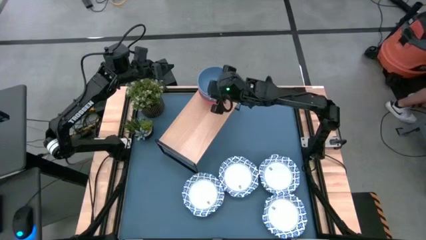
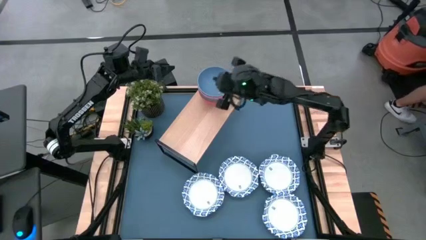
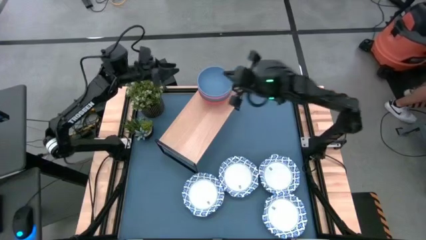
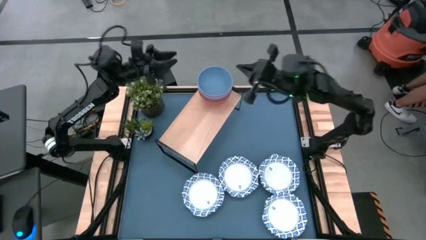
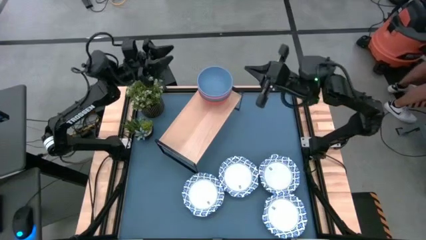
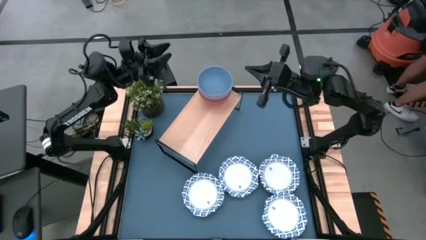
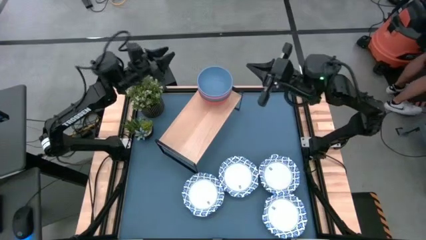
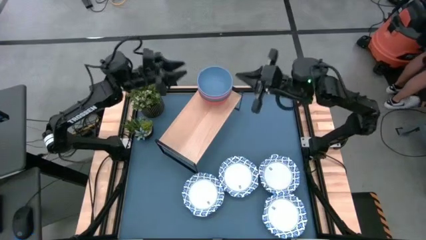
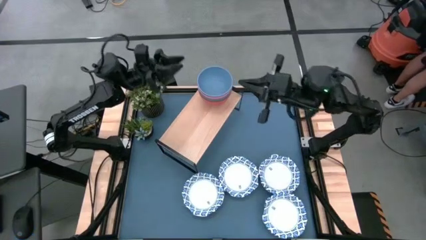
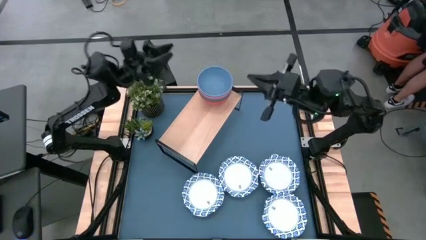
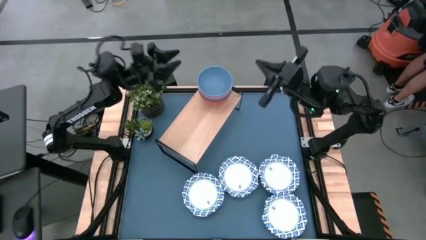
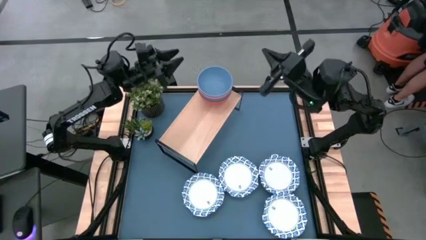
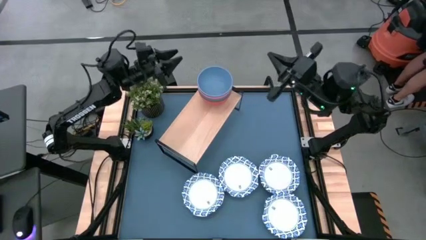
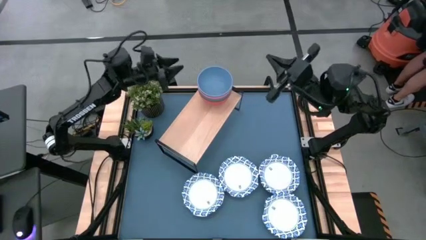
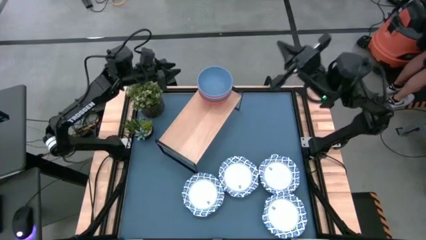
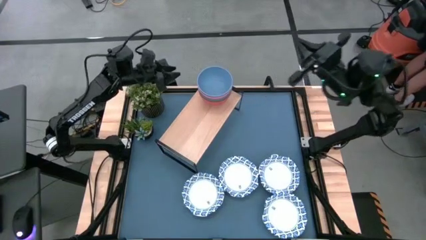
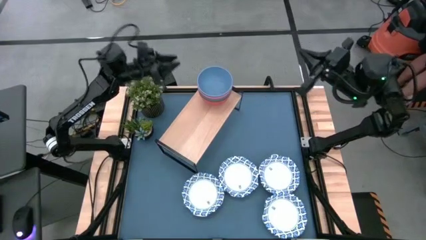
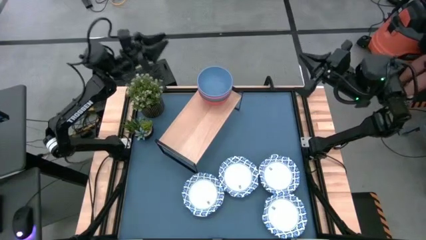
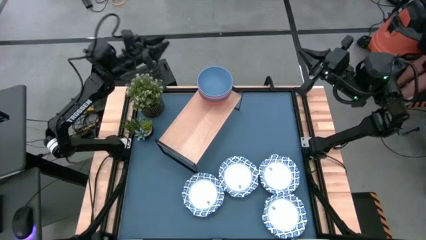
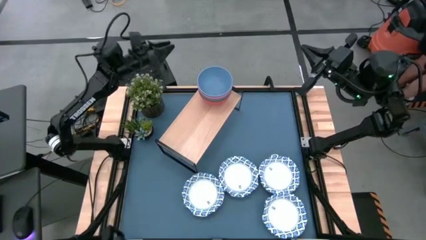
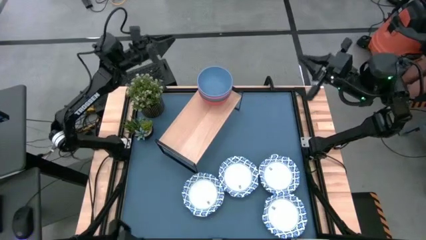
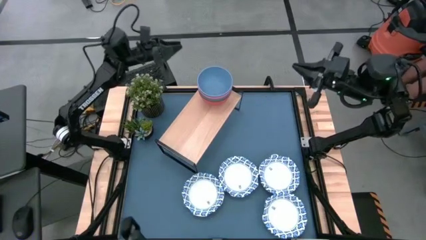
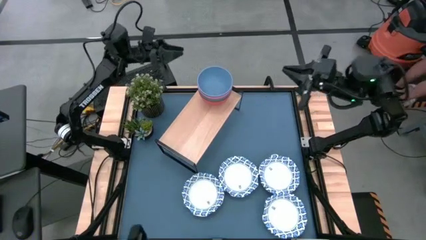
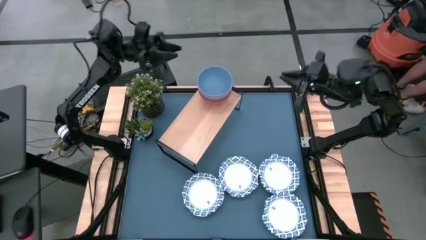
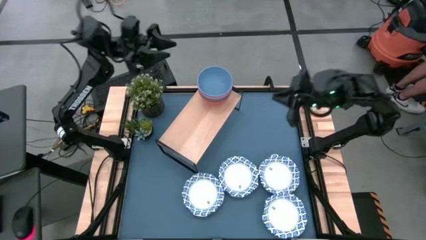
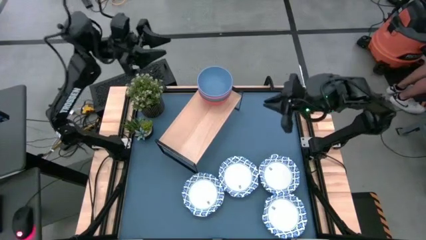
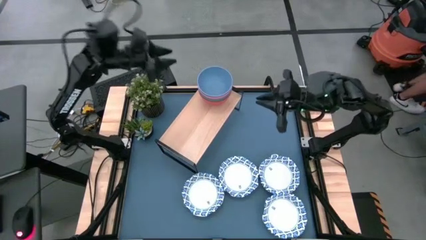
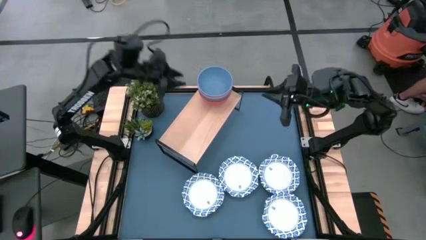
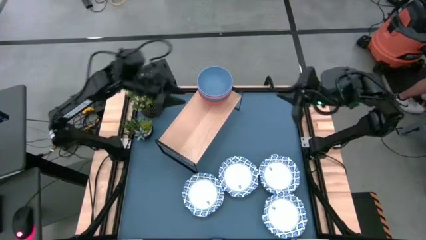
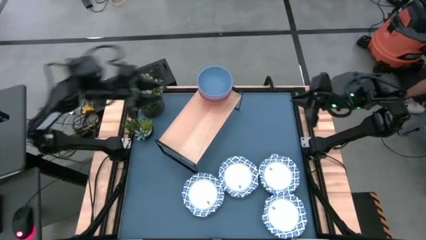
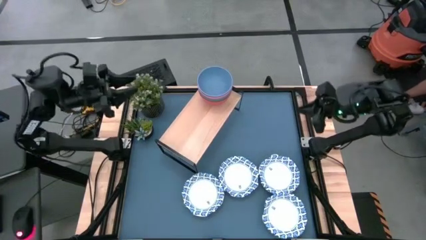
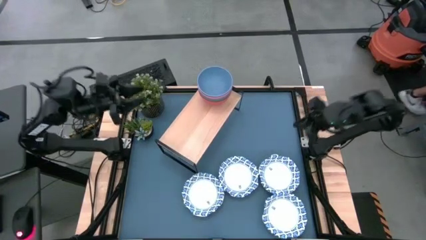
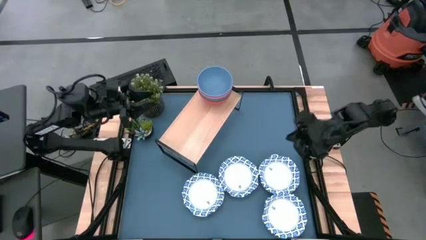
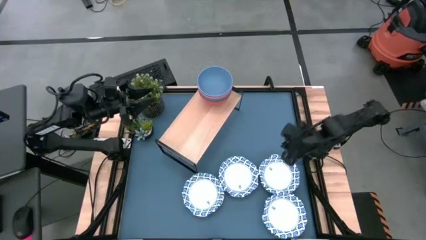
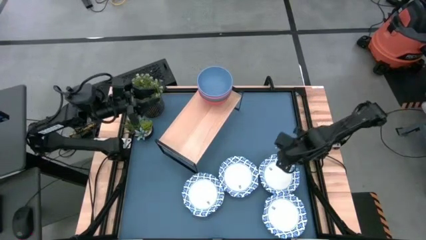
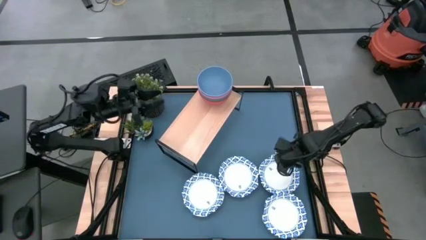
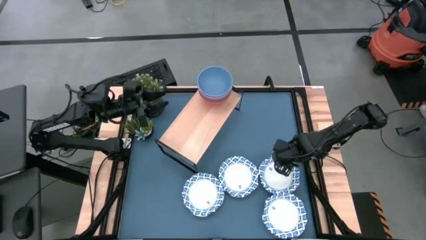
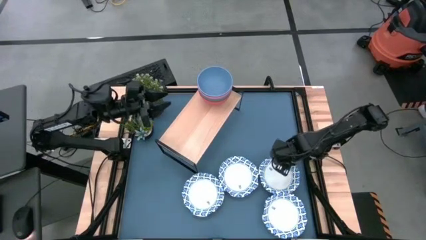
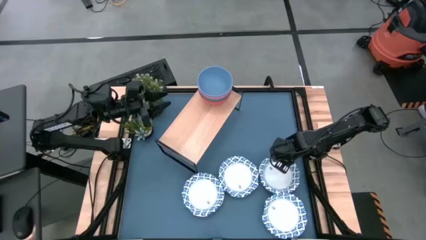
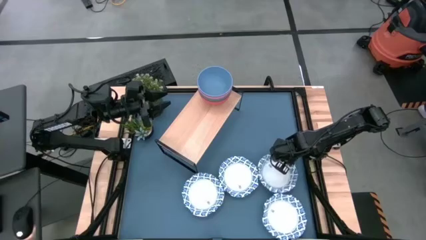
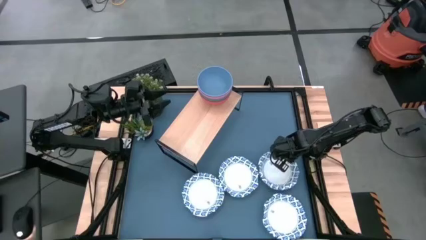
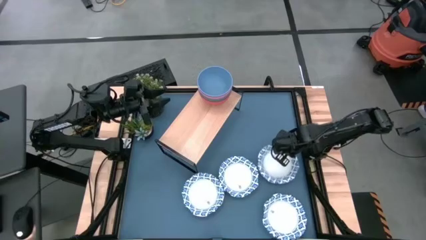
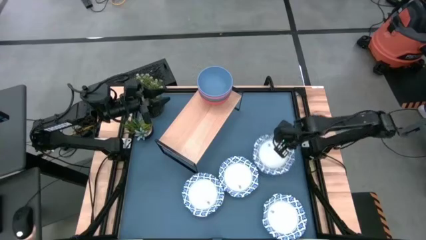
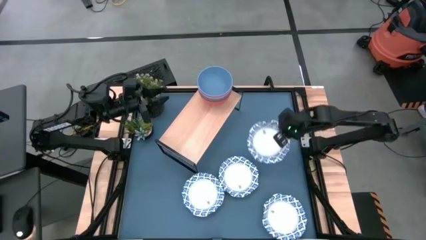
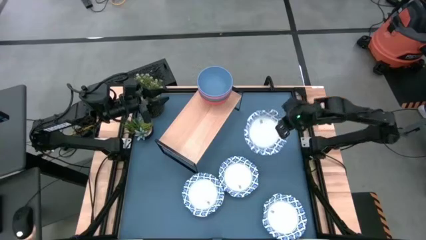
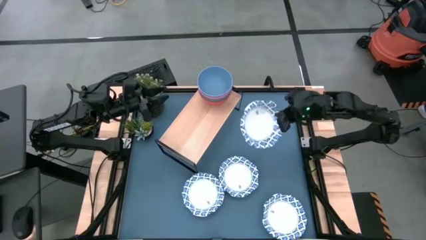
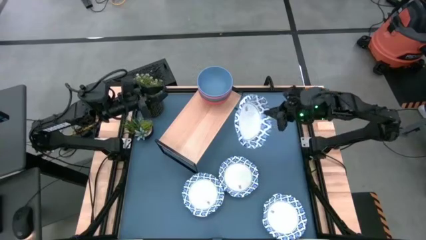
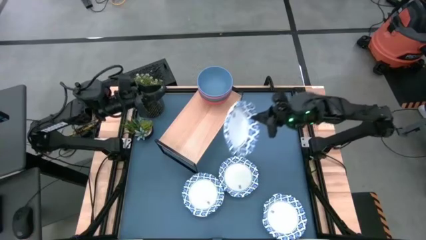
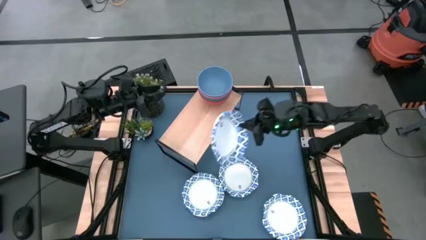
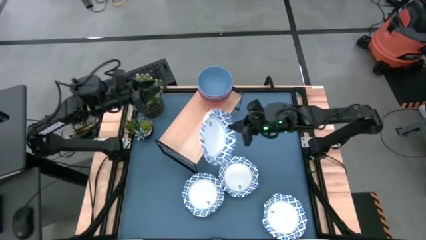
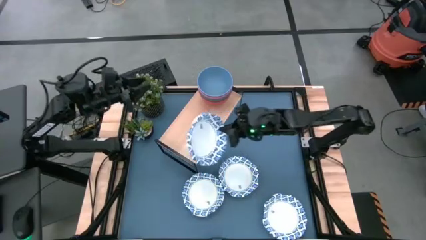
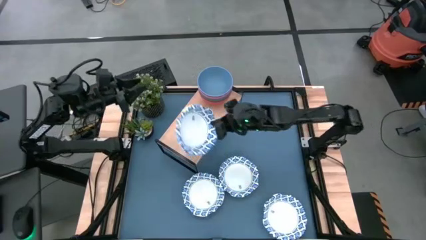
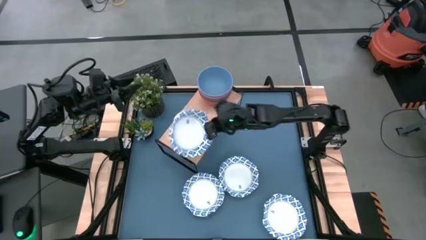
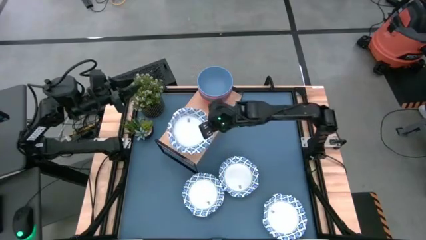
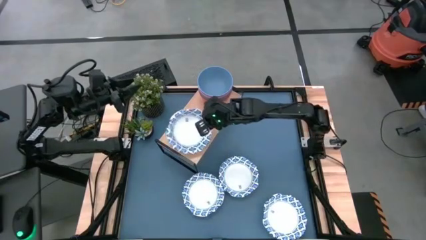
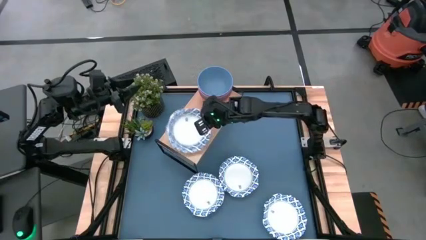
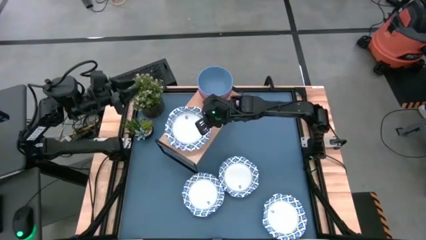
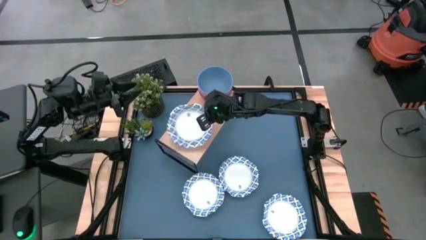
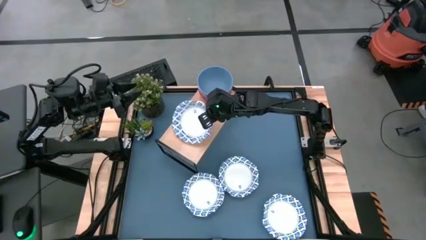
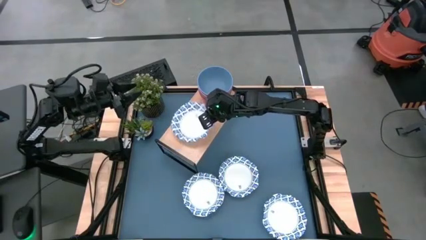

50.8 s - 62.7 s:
Task: Place and stack bowls onto a shelf
Put the white bowl on the shelf

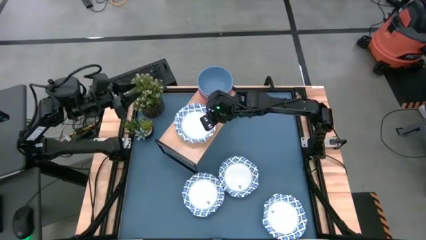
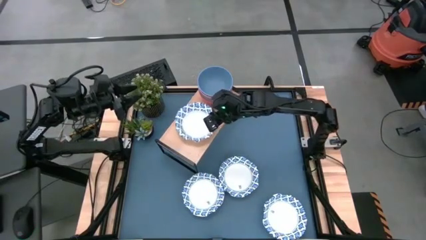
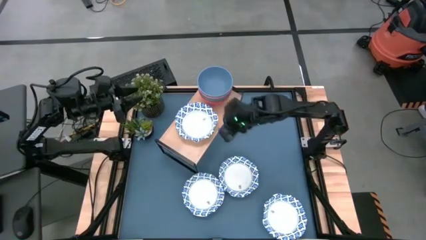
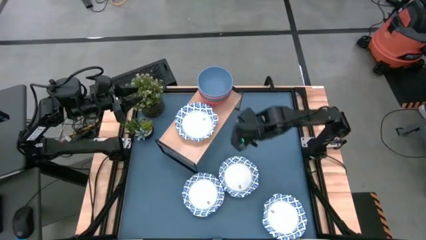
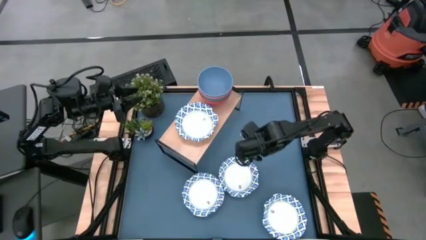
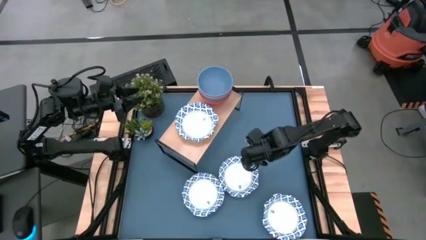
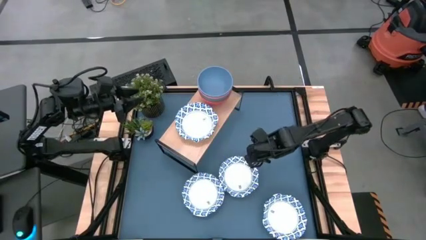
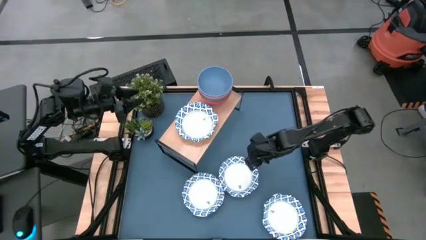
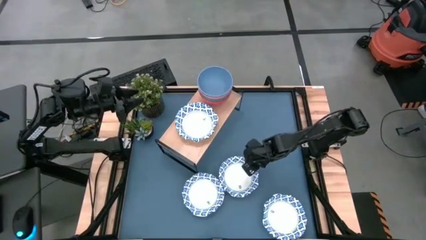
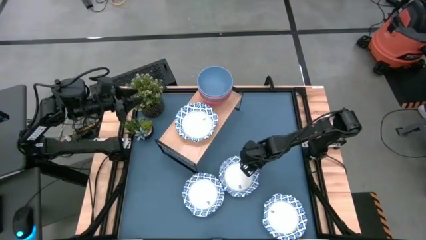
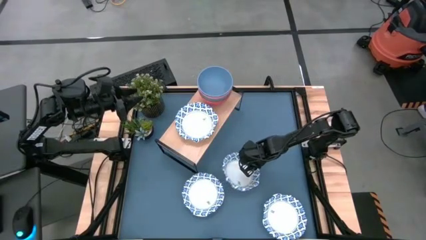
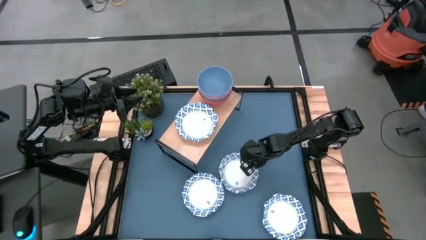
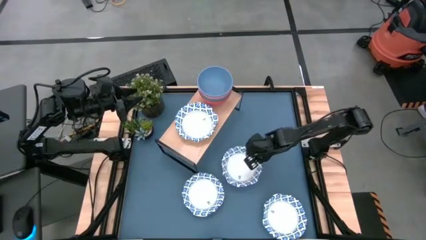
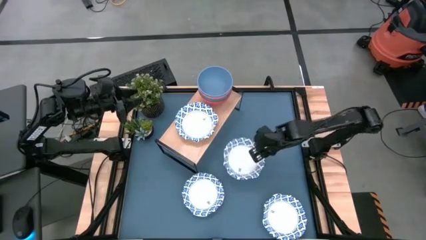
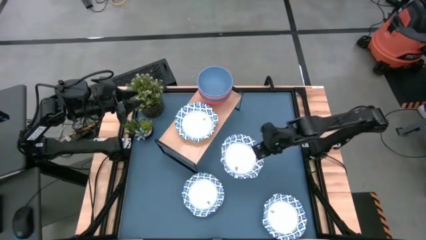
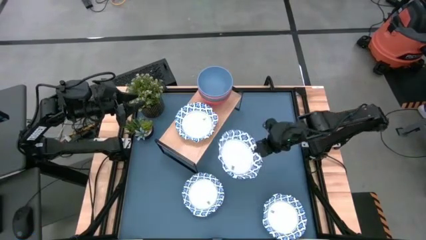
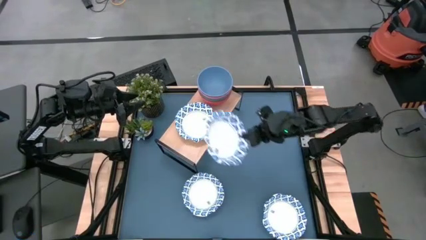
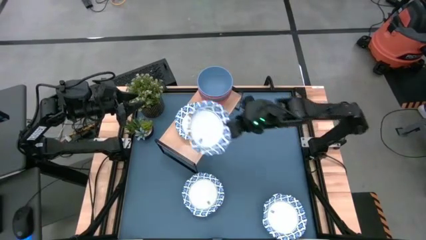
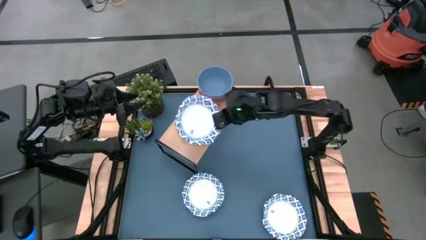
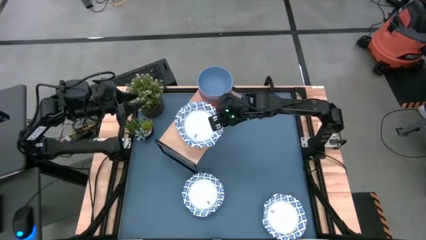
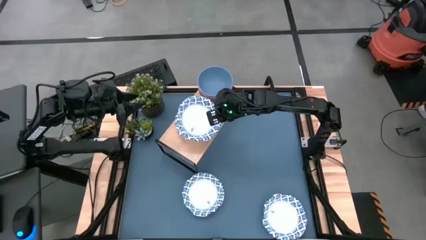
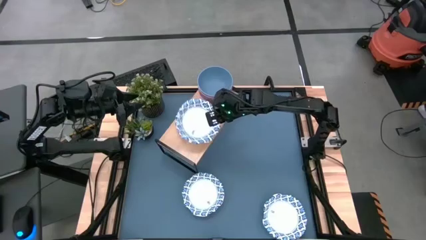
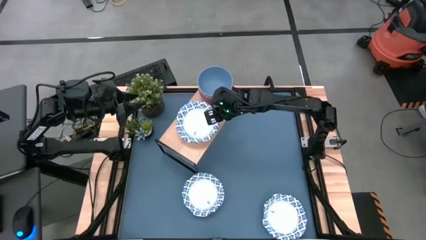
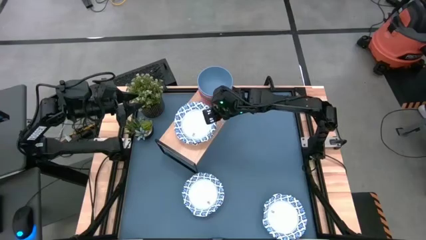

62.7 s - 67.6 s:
Stack the white bowl on top of the other white bowl on the shelf
